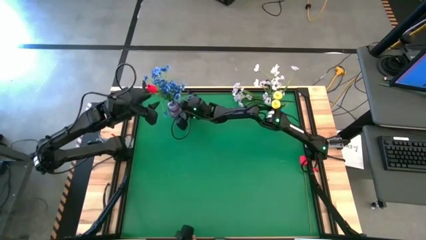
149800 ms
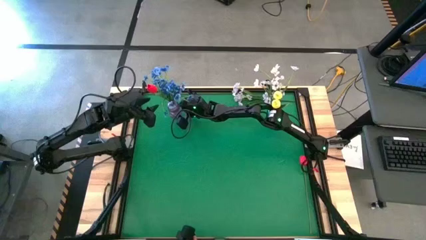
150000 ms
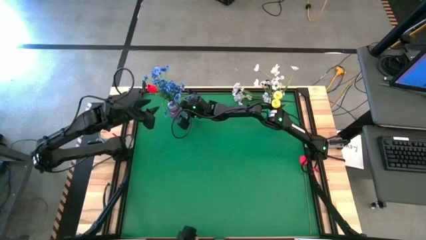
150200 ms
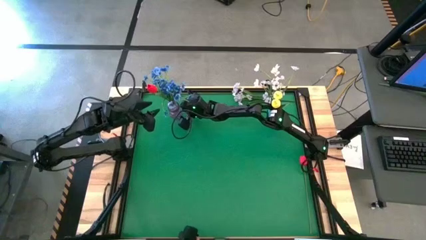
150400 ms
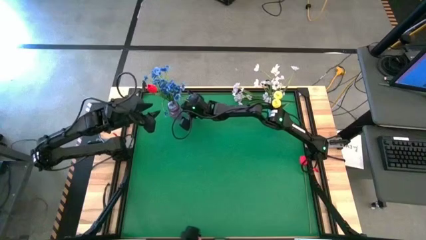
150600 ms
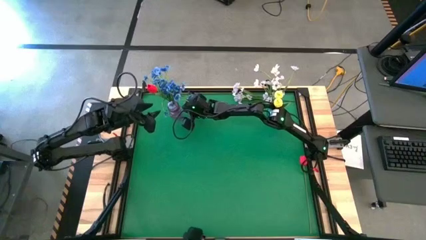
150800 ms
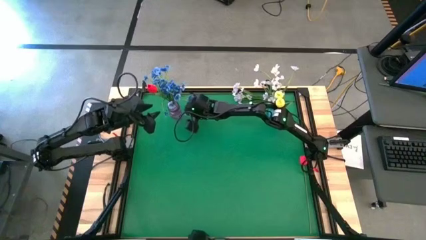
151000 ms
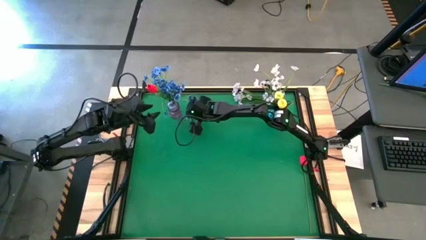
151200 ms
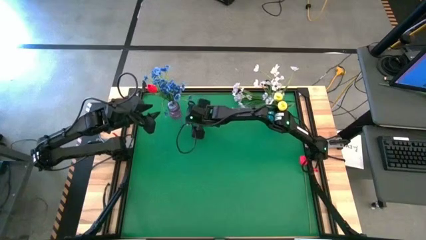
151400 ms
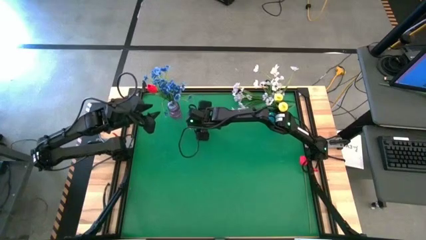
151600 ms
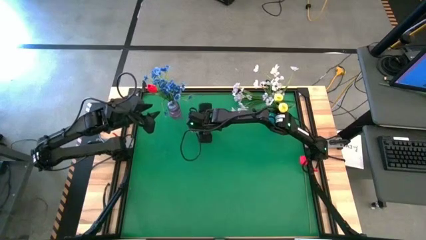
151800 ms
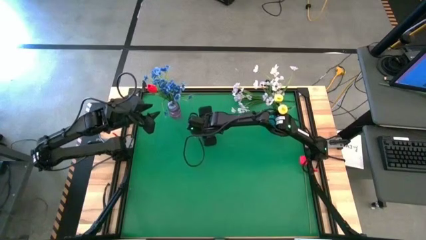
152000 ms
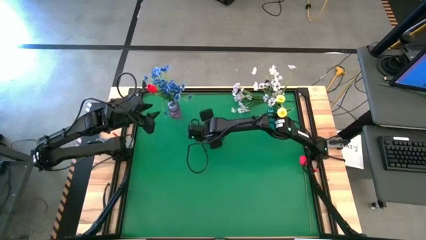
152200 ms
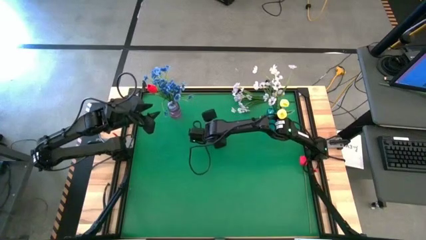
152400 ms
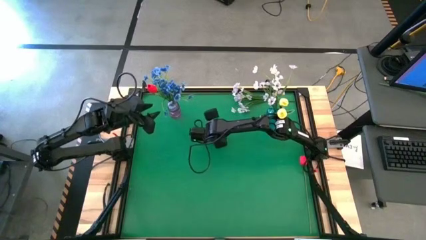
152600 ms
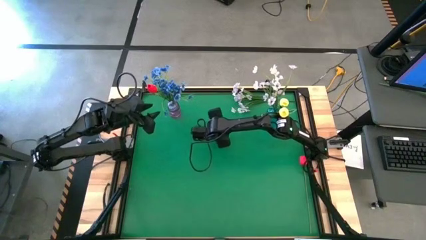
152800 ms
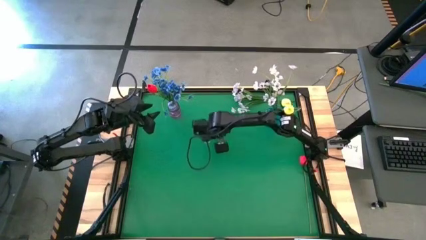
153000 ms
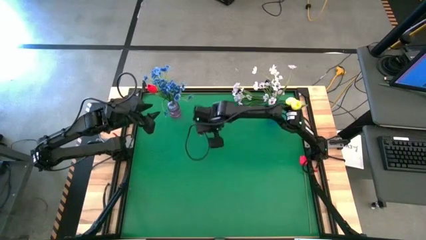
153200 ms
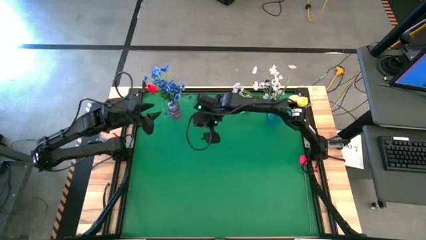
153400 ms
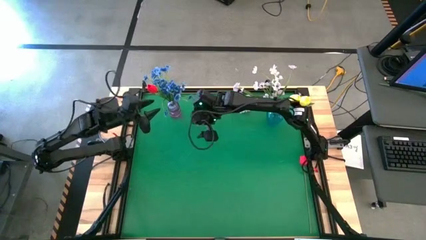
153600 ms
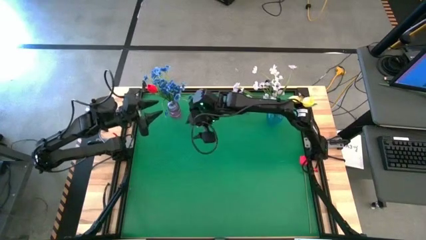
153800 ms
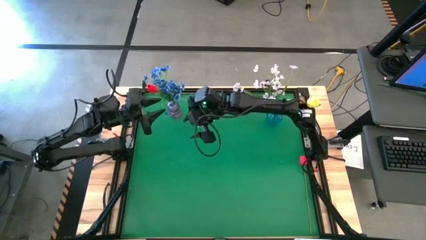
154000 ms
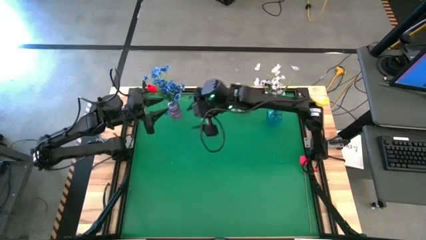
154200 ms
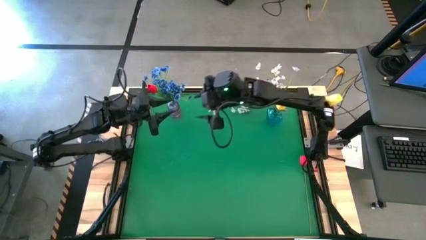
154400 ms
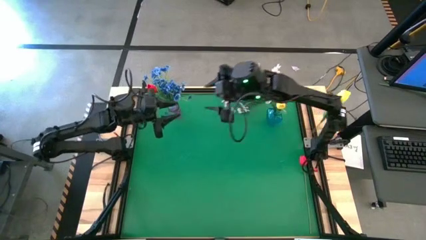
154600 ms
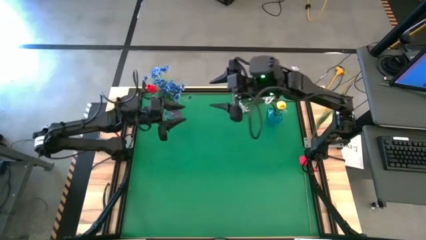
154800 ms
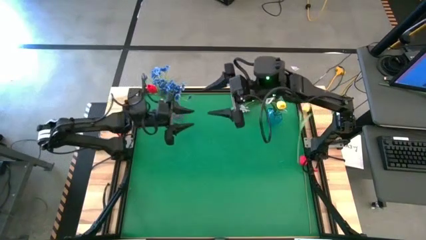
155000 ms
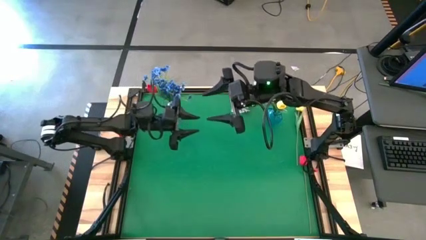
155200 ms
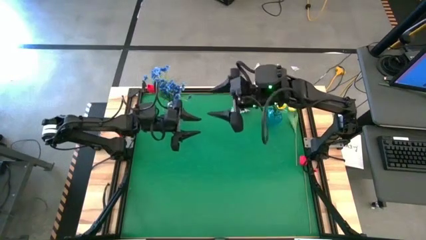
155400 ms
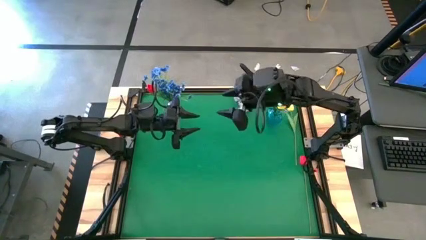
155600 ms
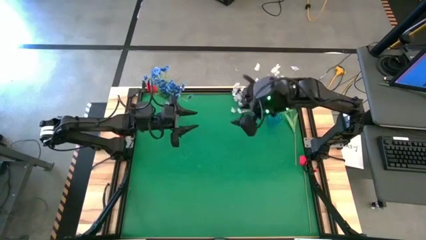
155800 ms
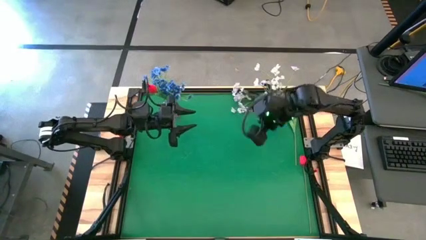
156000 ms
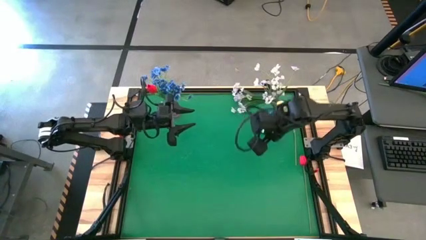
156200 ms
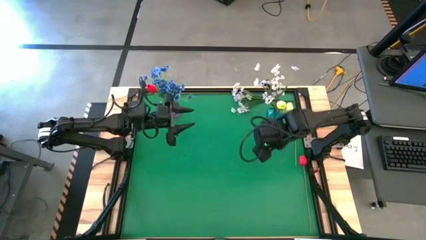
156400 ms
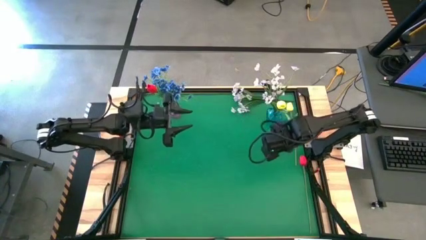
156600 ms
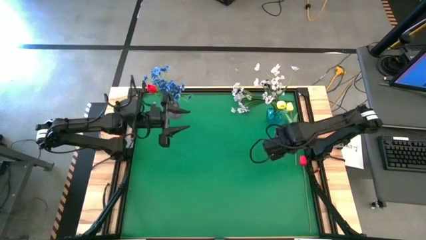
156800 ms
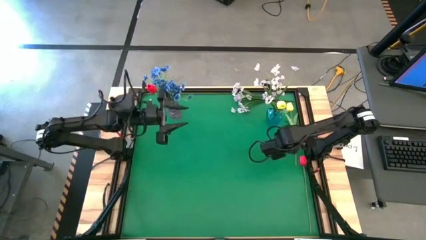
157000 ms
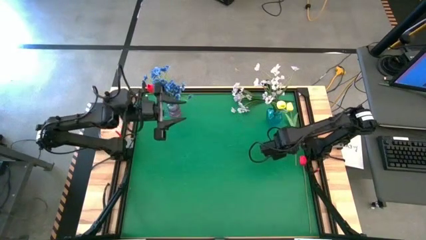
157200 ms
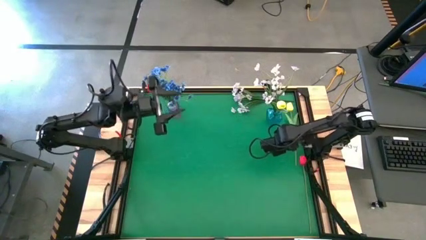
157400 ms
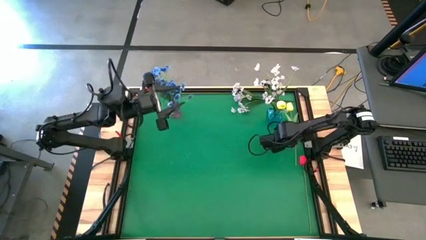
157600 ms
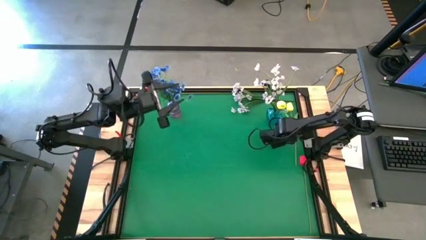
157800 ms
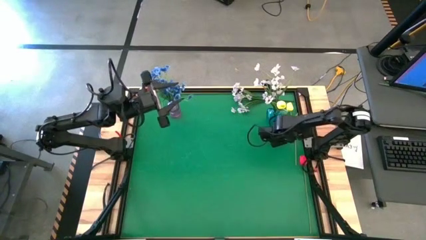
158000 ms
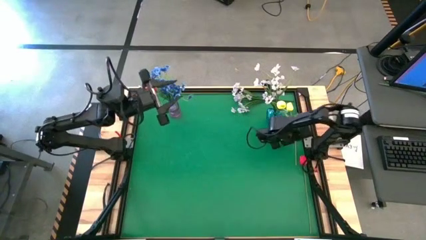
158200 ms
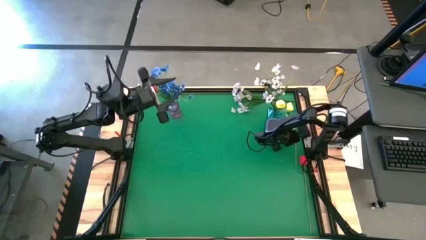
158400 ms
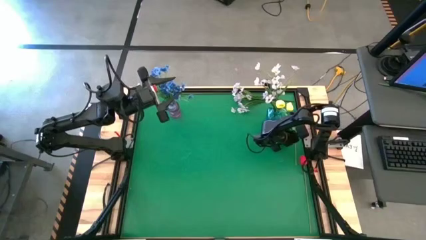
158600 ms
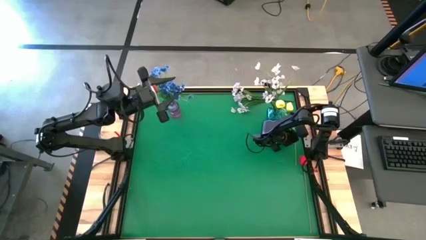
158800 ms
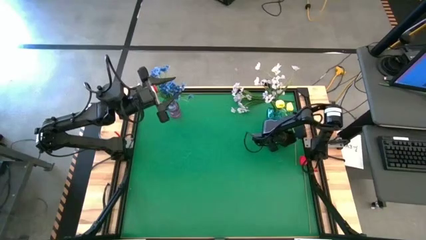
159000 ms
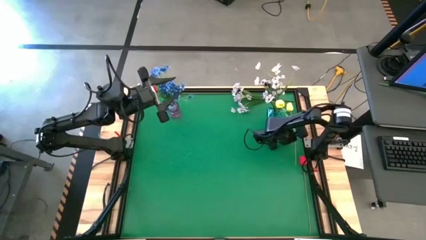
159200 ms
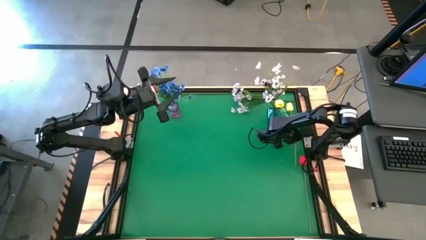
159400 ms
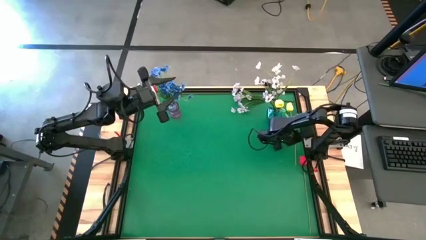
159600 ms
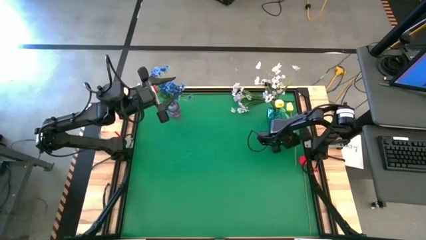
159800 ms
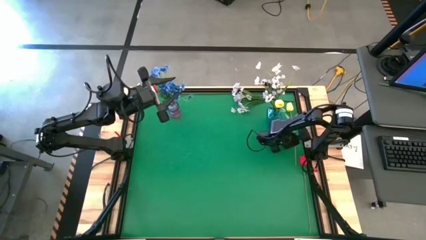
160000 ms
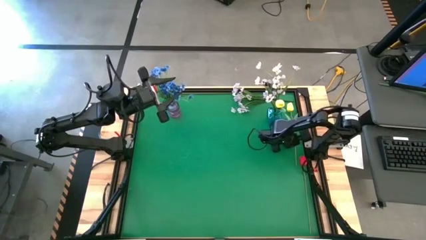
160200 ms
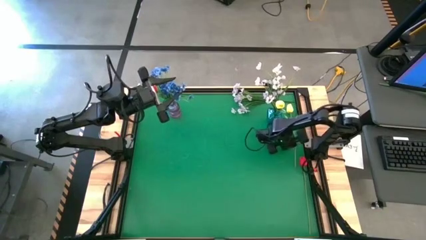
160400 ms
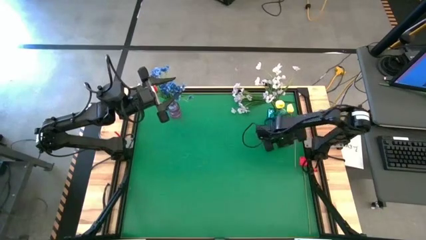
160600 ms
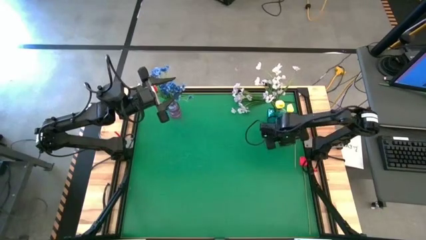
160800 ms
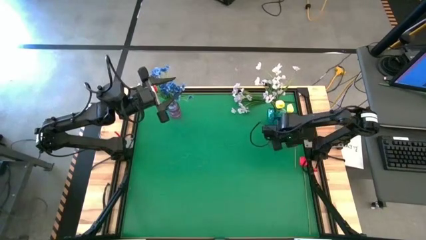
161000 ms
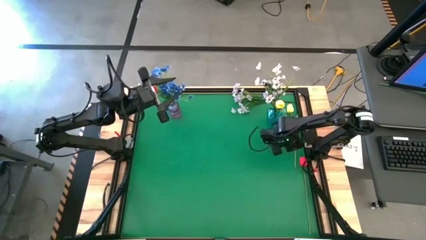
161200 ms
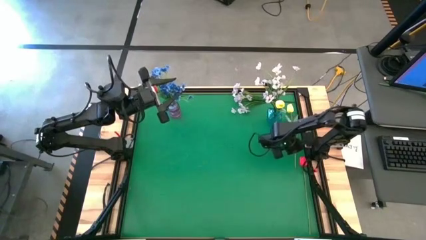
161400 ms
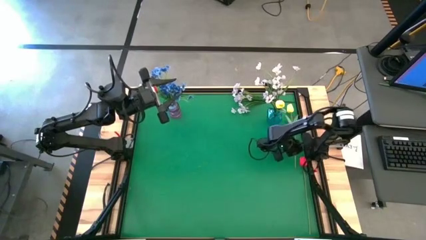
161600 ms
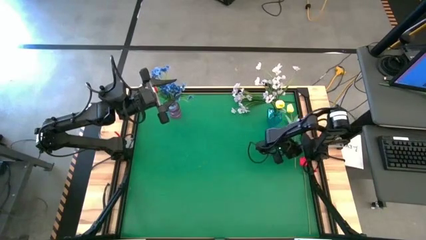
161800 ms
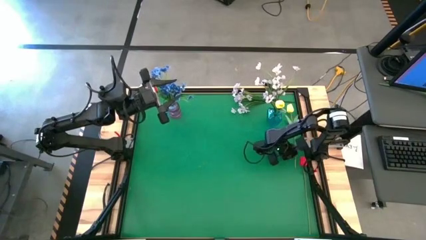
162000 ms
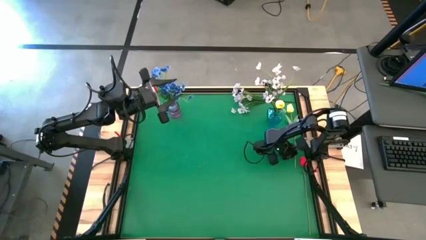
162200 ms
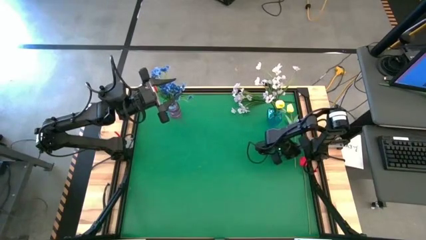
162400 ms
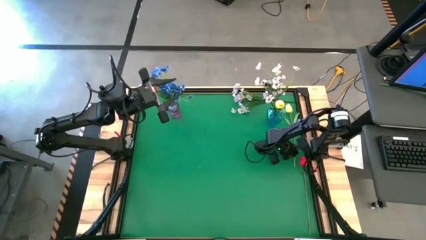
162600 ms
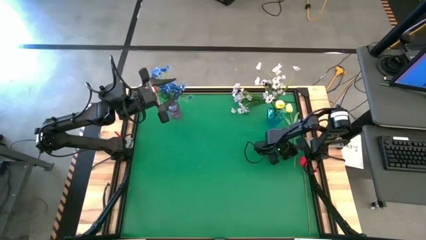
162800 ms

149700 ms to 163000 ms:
Task: Sort flowers into vase by color
Put the yellow tulip into the blue vase
